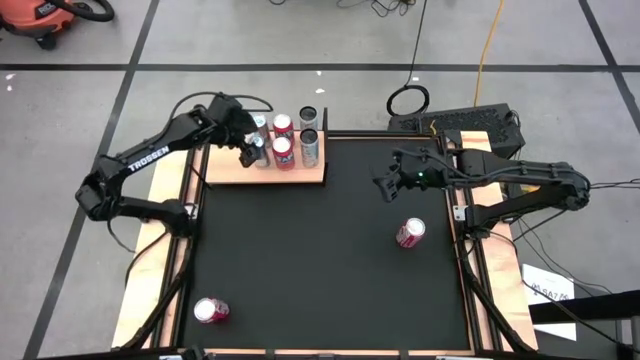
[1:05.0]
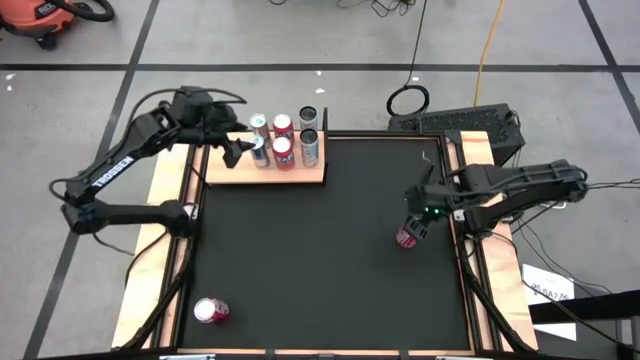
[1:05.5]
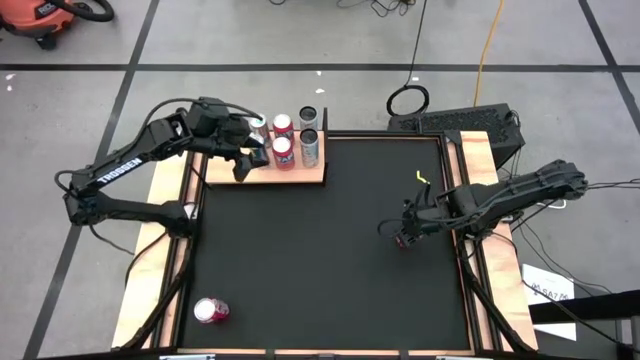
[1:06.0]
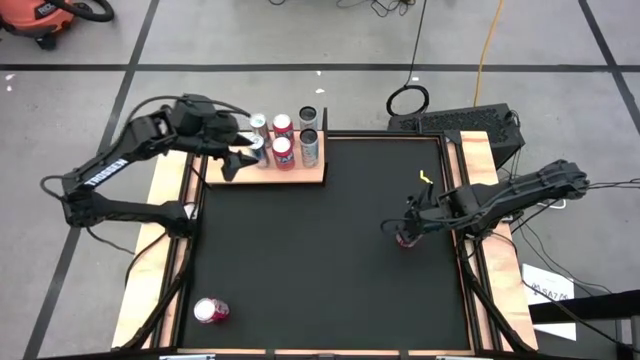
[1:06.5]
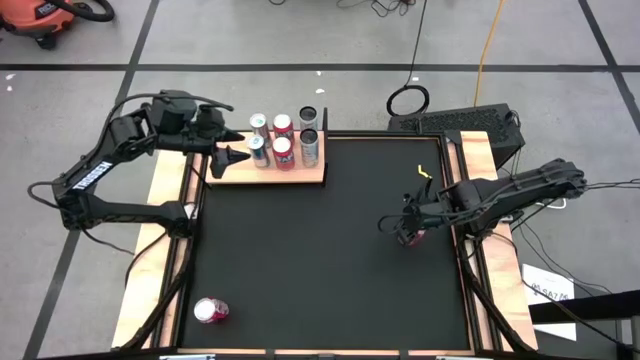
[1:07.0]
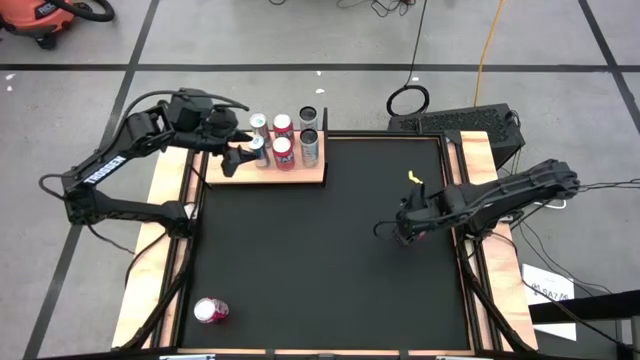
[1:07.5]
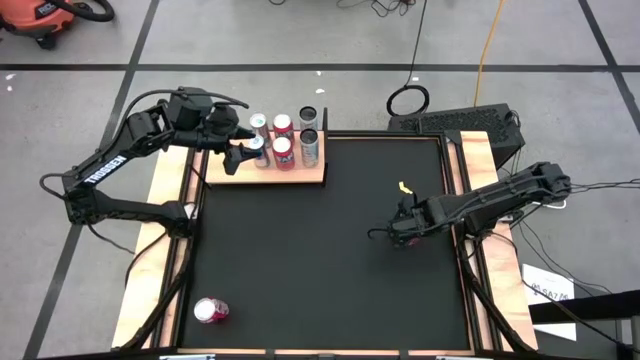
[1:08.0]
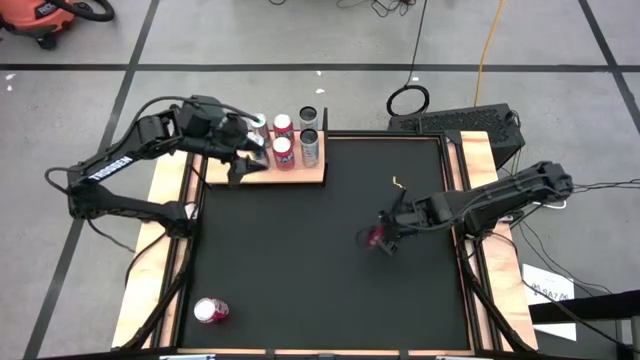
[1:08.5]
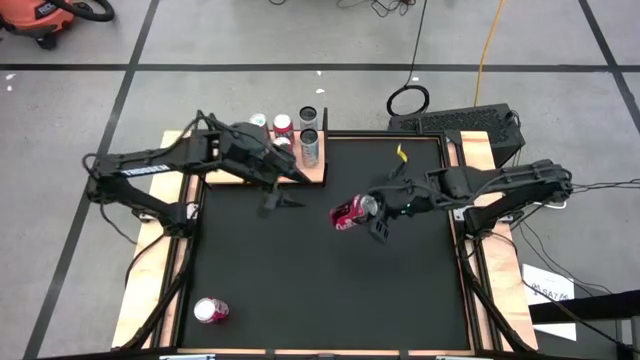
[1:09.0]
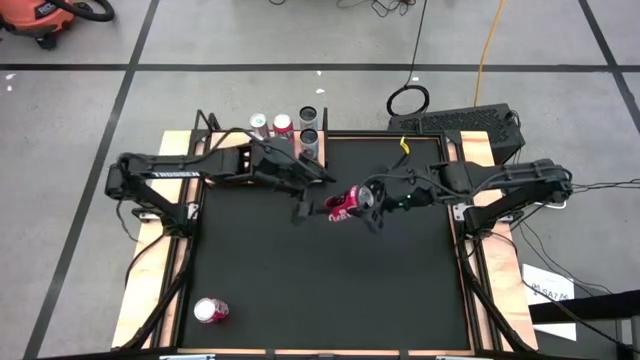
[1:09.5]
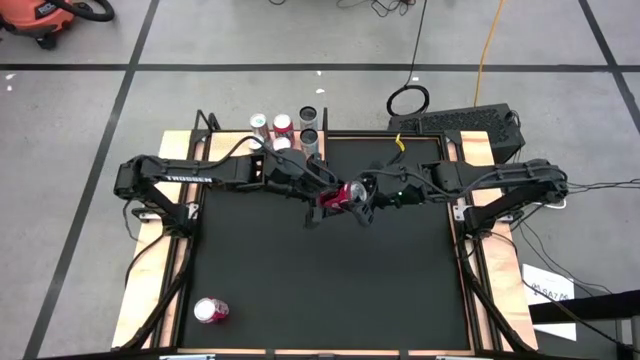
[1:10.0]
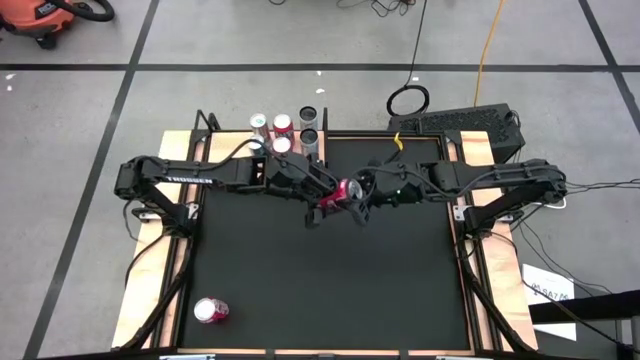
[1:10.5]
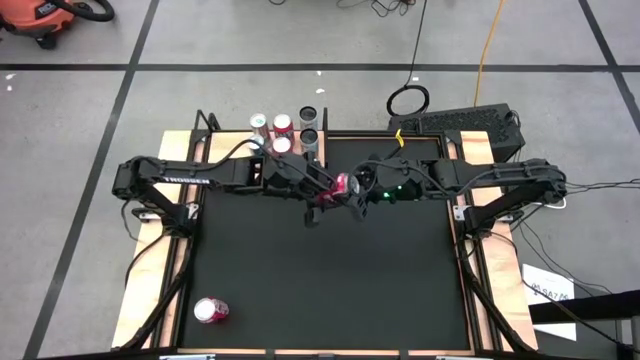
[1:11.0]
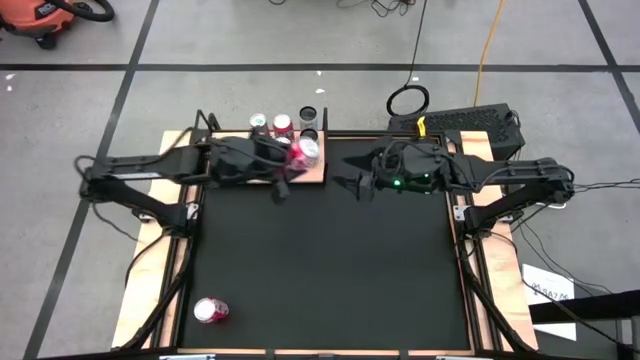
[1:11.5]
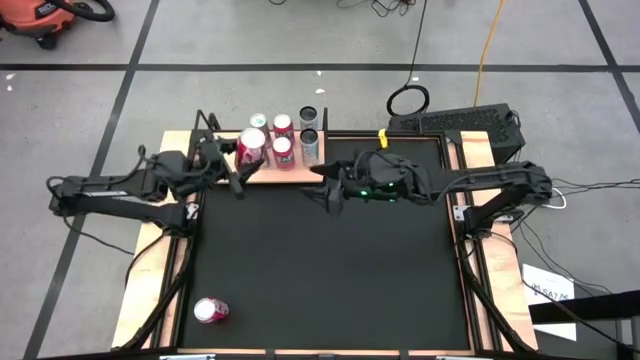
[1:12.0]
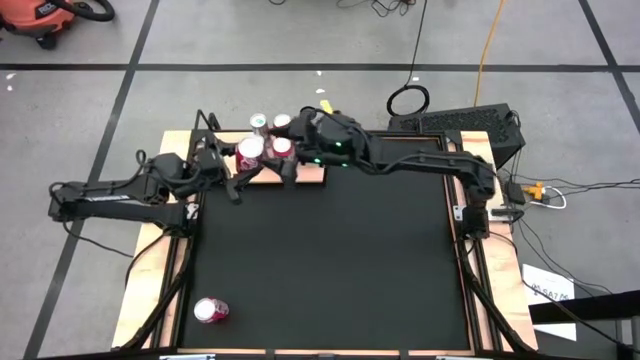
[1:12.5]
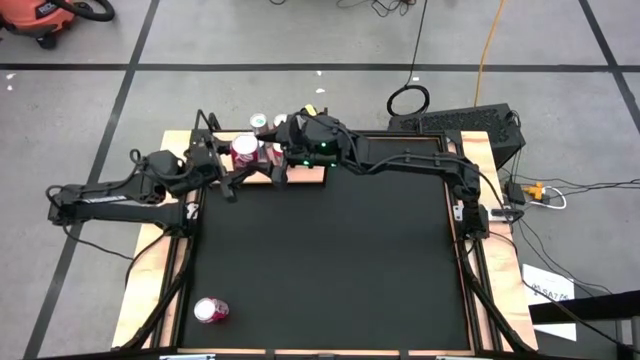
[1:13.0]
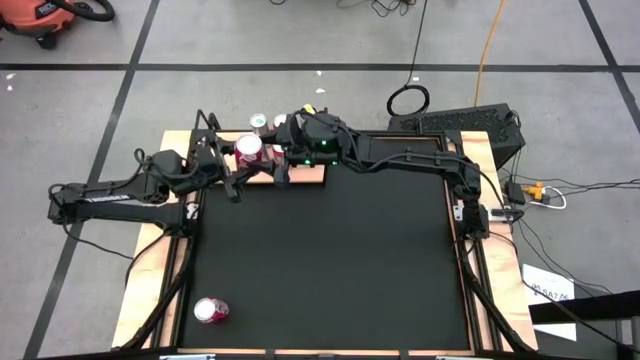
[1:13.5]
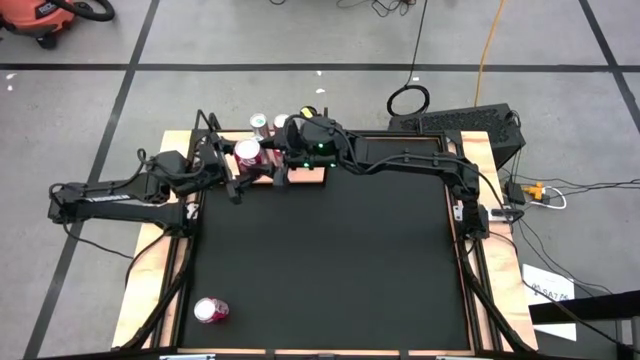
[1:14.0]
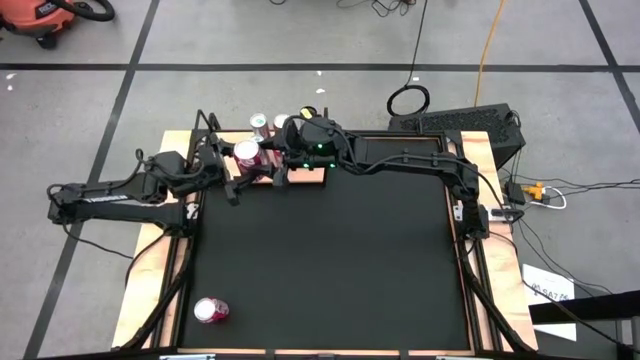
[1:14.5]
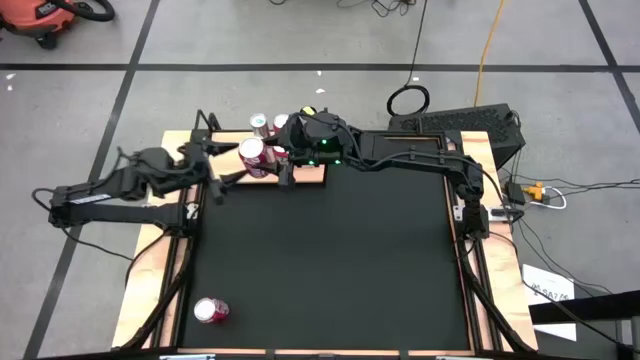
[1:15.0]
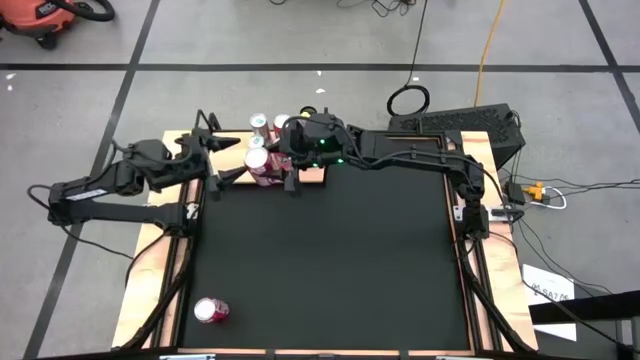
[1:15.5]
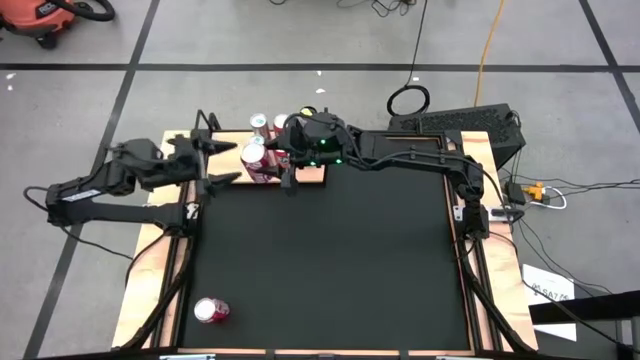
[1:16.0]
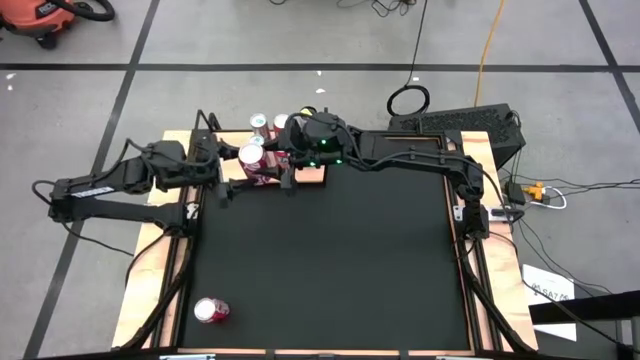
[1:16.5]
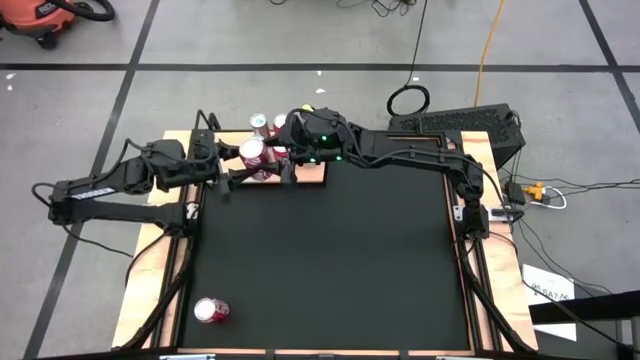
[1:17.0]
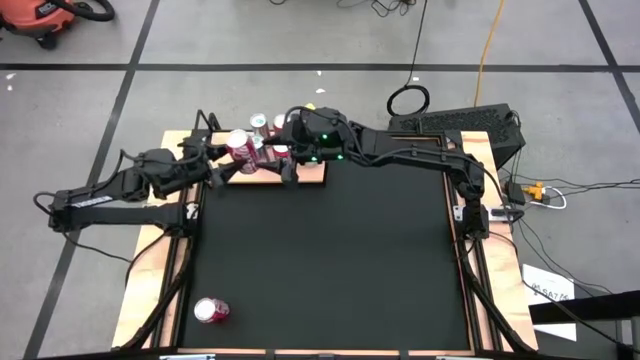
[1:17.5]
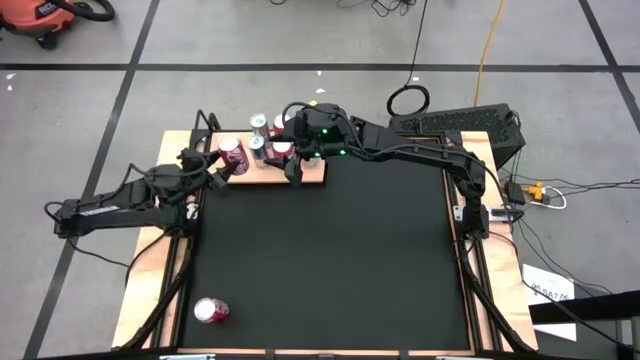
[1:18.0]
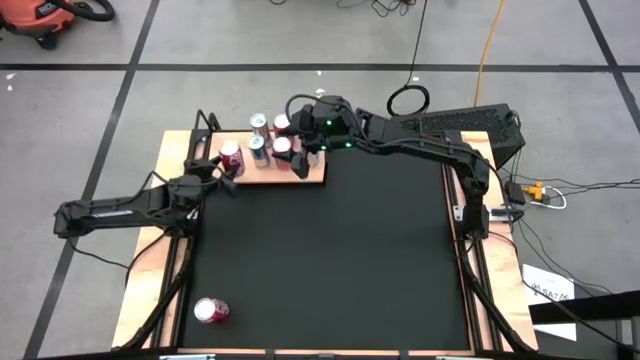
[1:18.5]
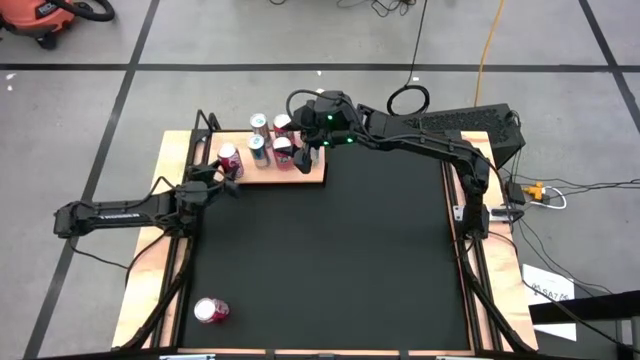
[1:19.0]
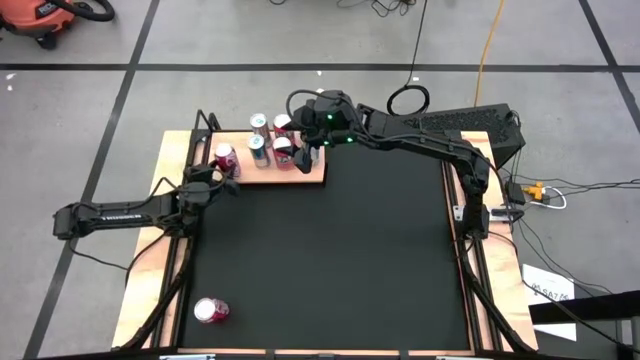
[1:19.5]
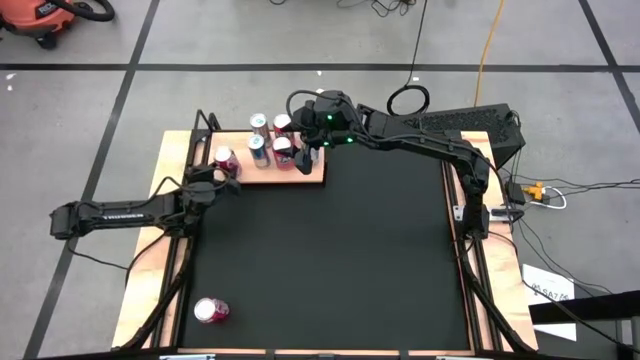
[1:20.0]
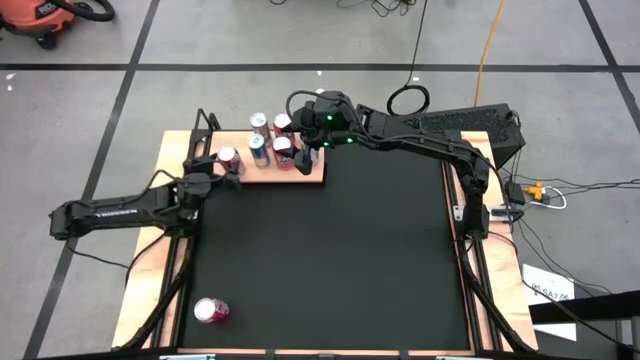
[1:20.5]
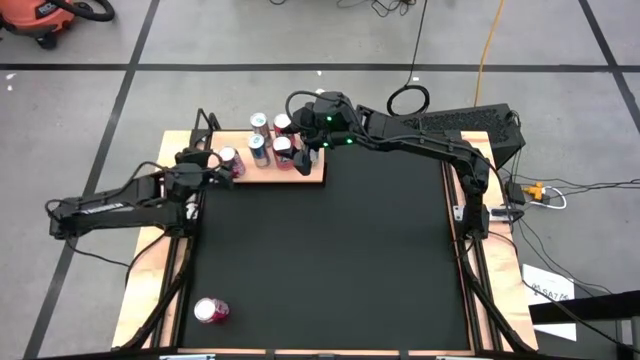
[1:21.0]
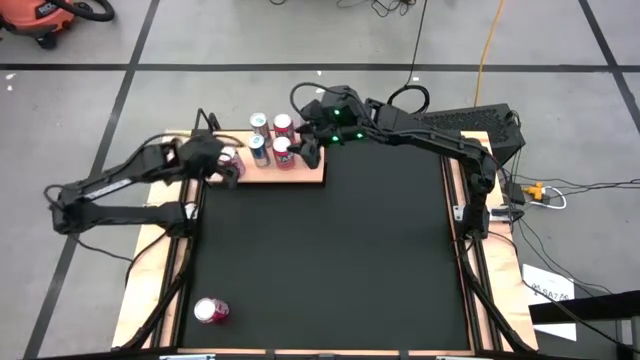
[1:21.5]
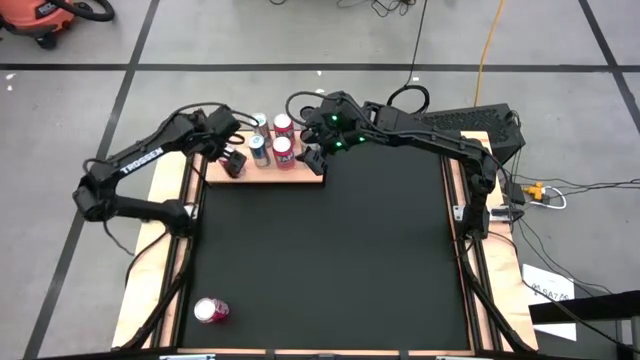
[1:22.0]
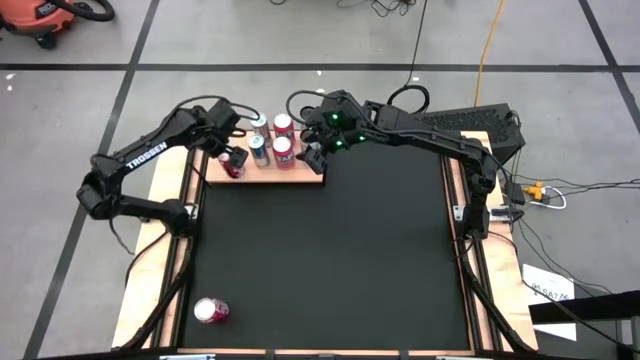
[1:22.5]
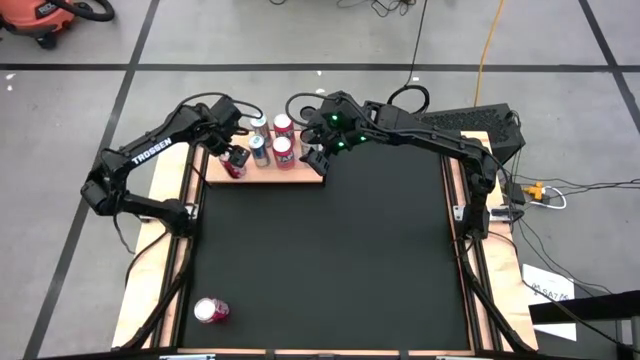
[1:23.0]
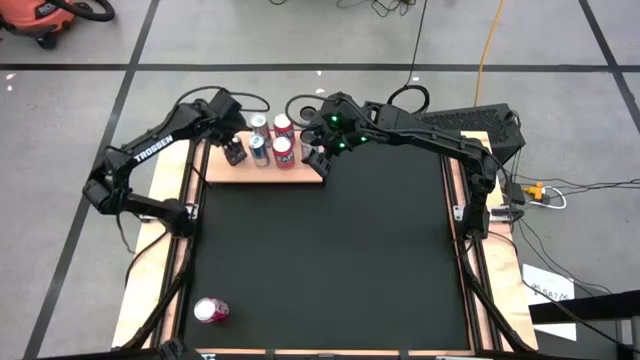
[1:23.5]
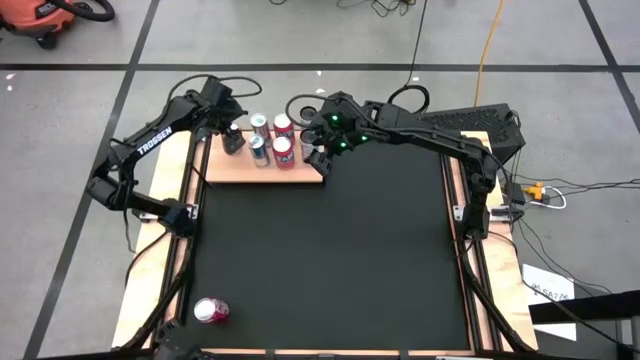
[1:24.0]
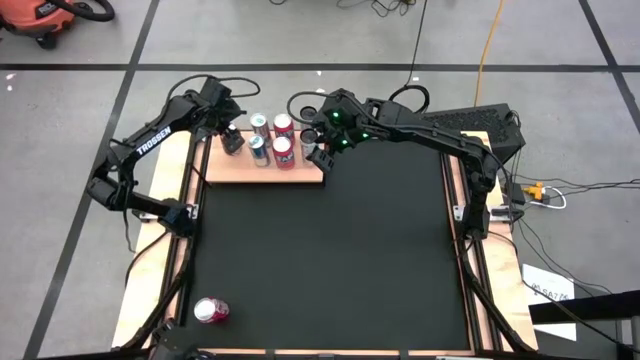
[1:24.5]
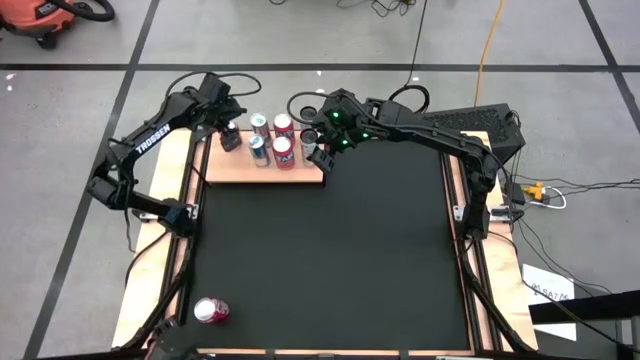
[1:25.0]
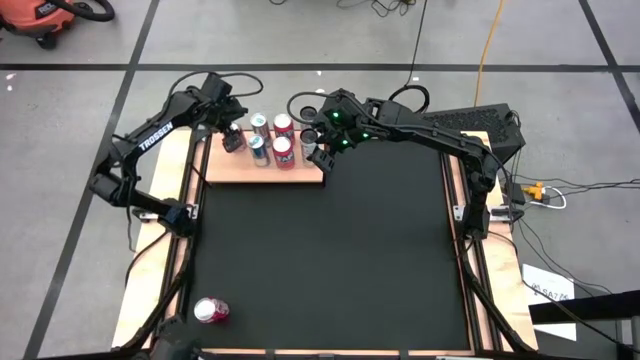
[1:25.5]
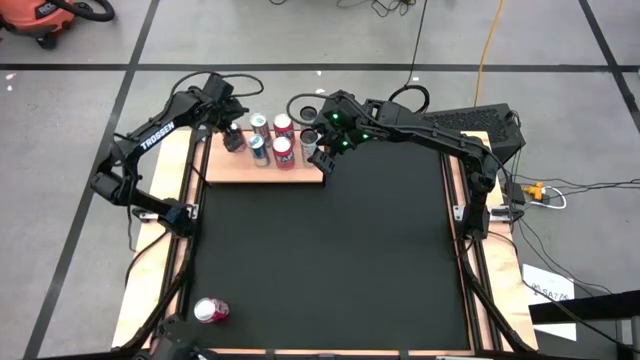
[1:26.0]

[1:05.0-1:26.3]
Task: Place canned beverage on shelf
Put the top red-white soda can on the shelf
